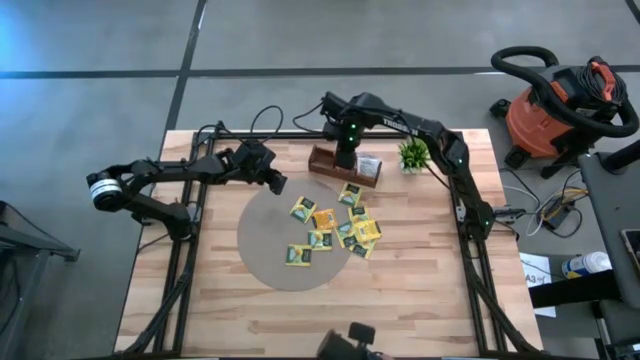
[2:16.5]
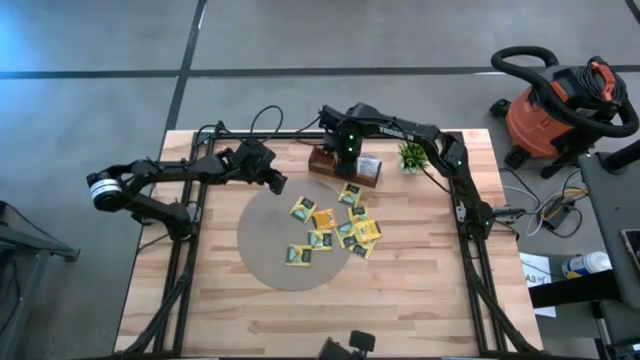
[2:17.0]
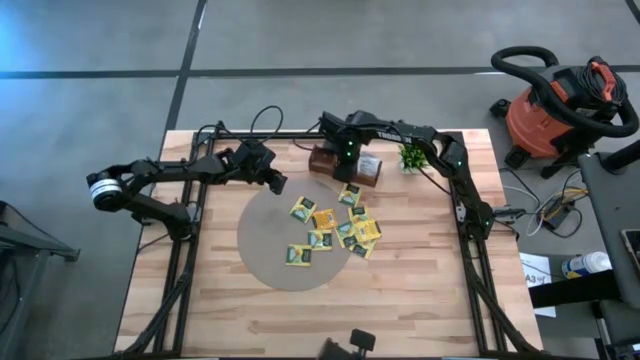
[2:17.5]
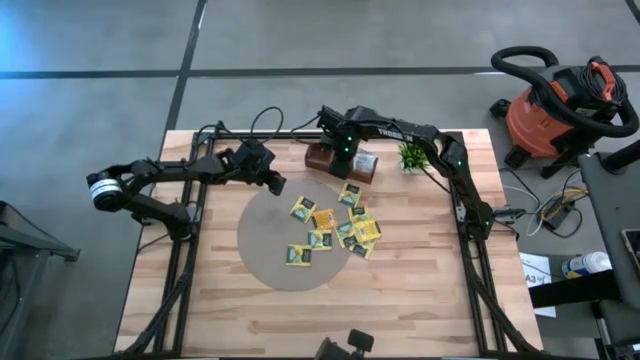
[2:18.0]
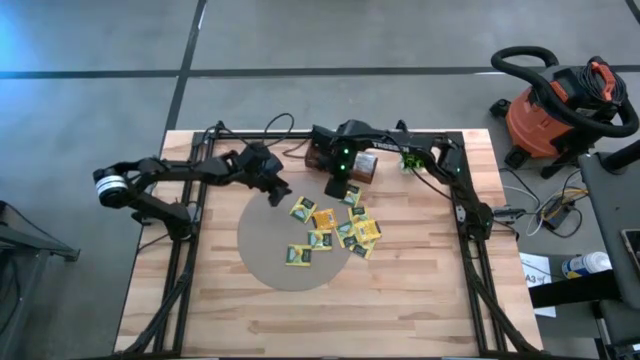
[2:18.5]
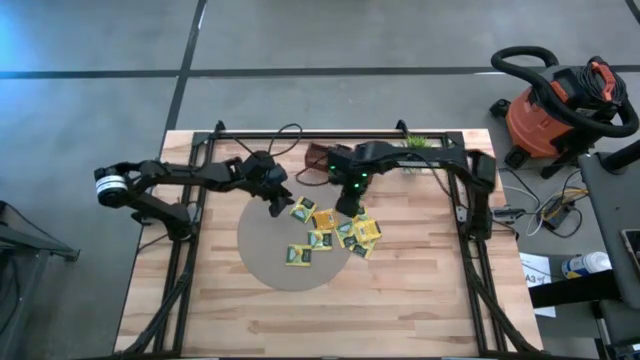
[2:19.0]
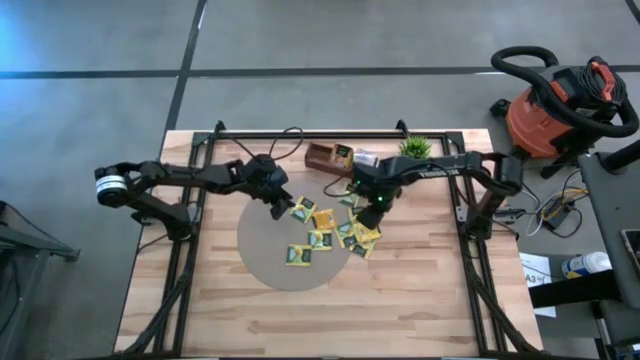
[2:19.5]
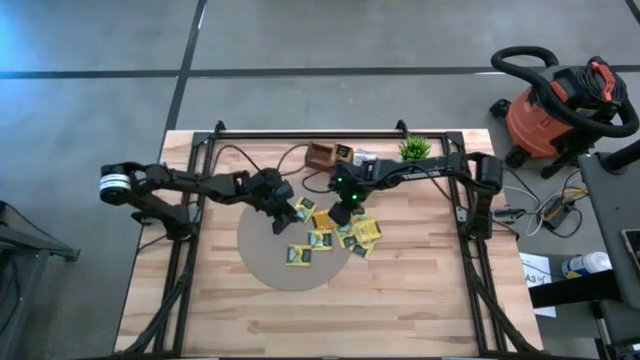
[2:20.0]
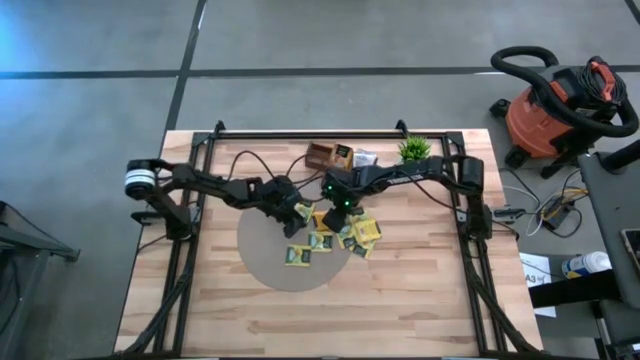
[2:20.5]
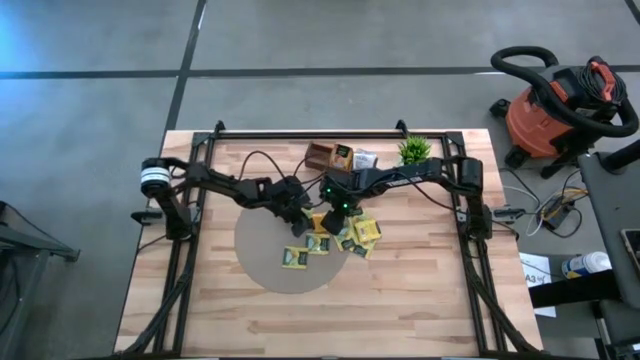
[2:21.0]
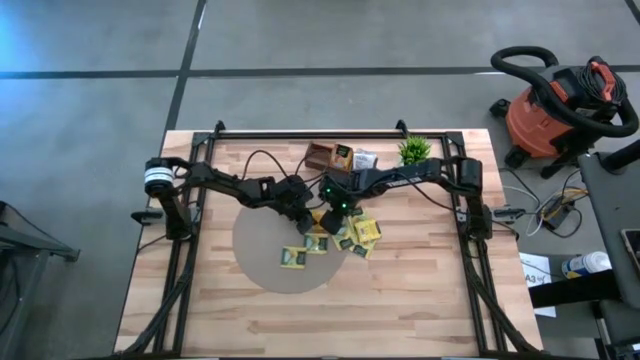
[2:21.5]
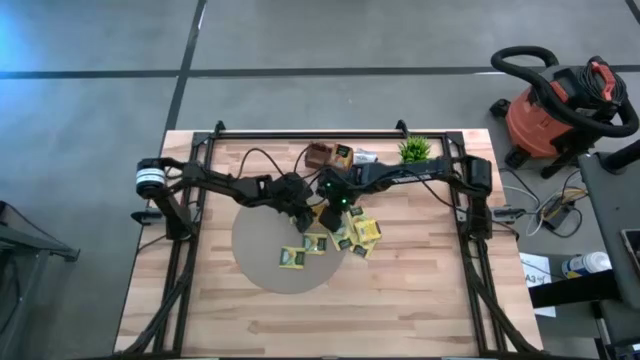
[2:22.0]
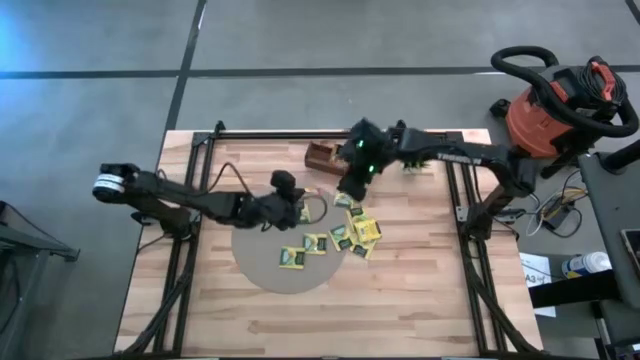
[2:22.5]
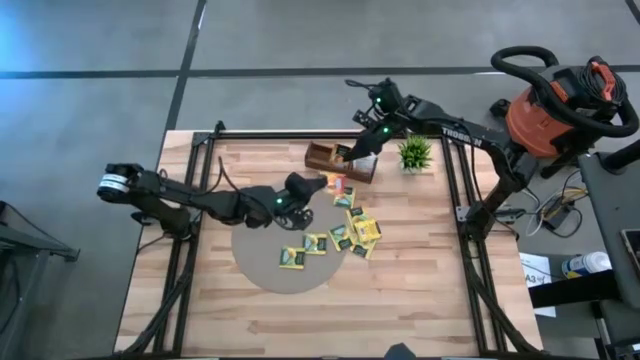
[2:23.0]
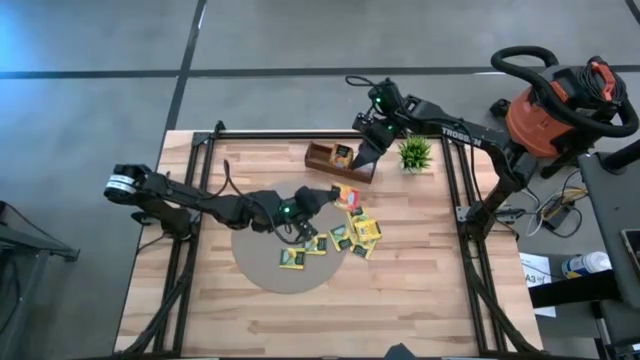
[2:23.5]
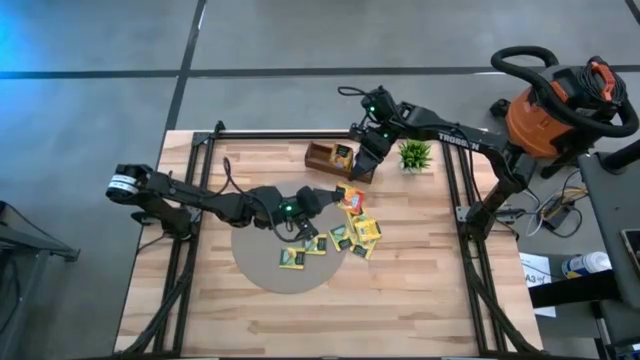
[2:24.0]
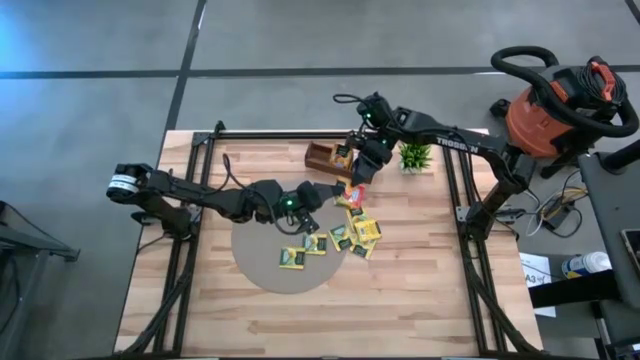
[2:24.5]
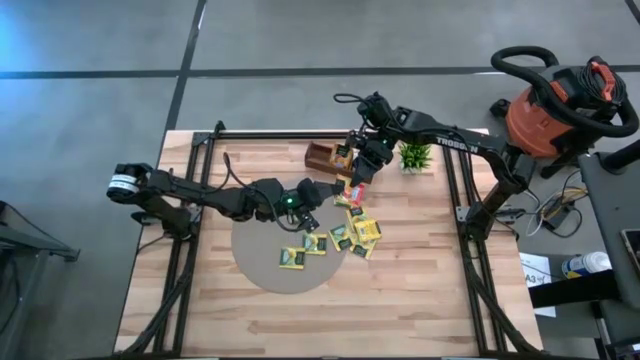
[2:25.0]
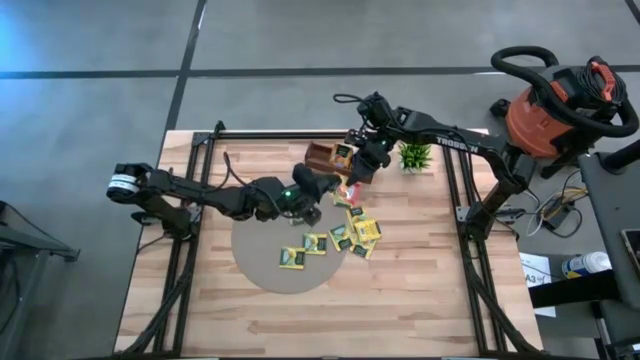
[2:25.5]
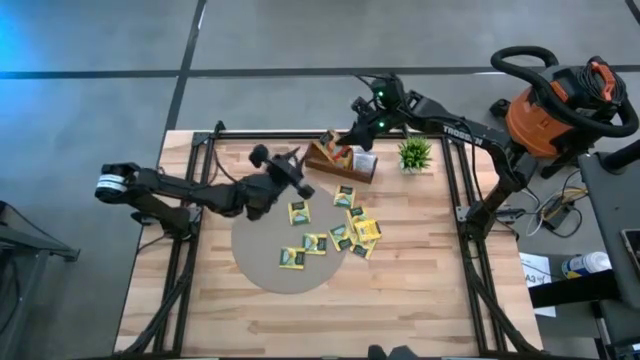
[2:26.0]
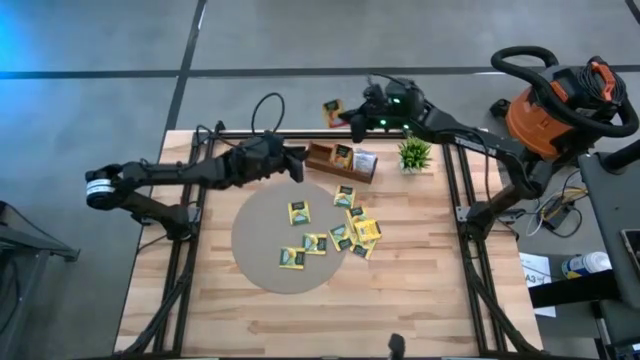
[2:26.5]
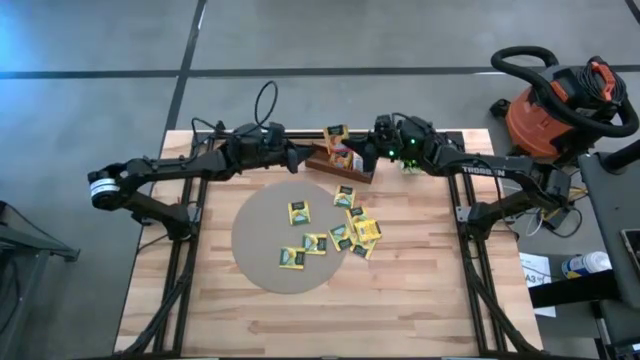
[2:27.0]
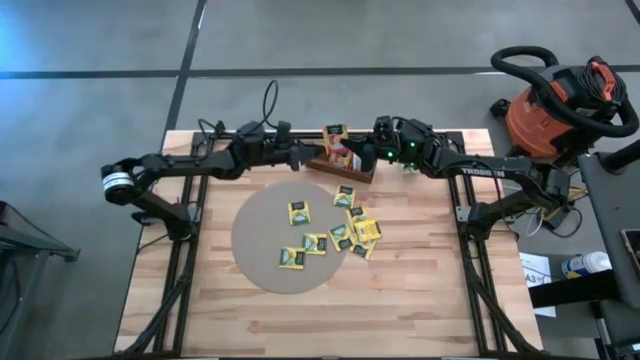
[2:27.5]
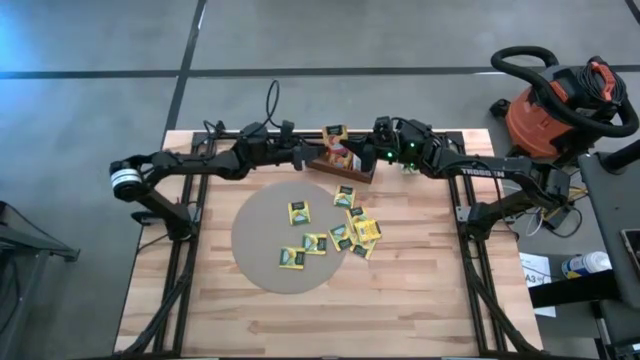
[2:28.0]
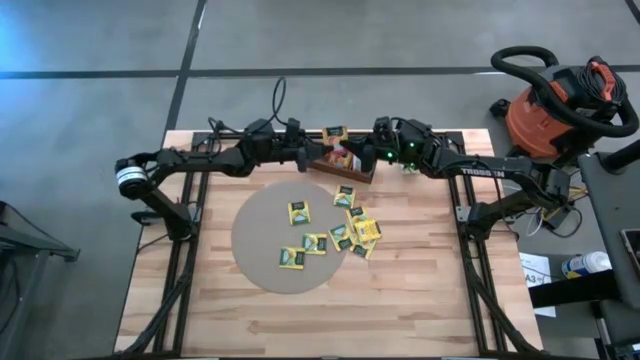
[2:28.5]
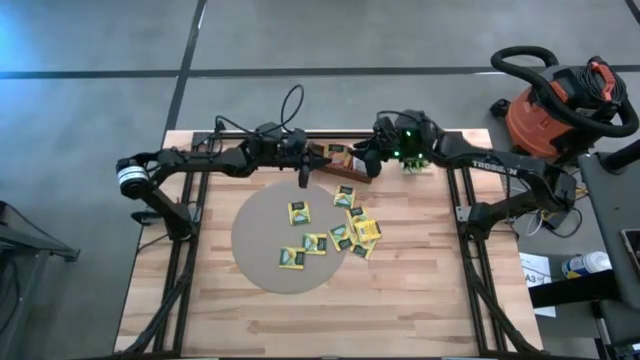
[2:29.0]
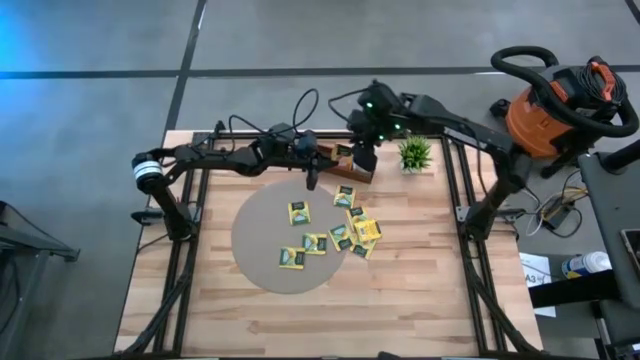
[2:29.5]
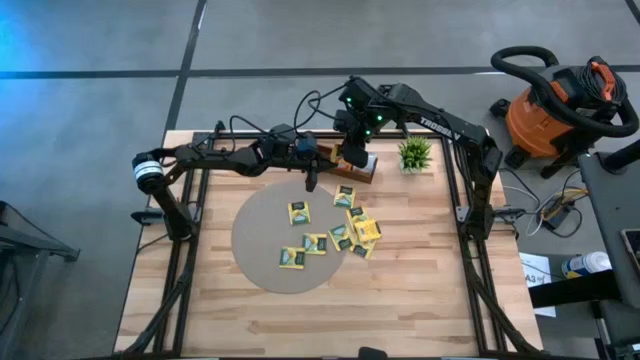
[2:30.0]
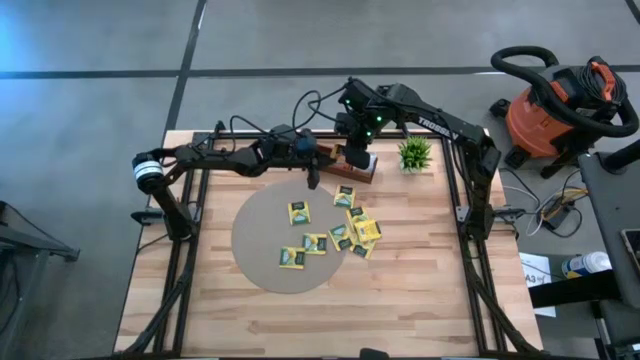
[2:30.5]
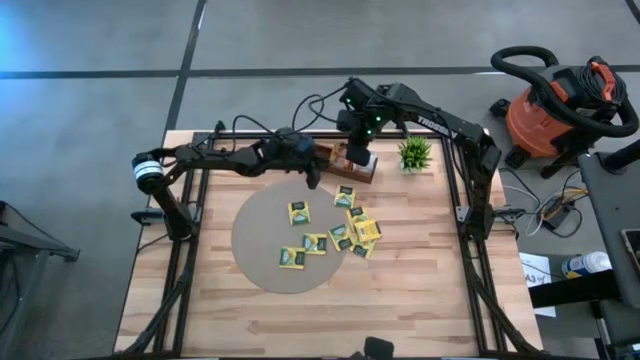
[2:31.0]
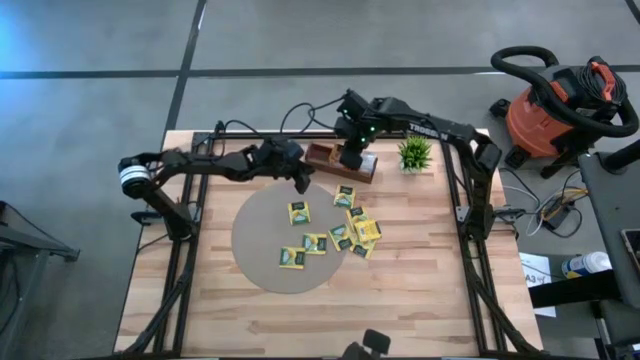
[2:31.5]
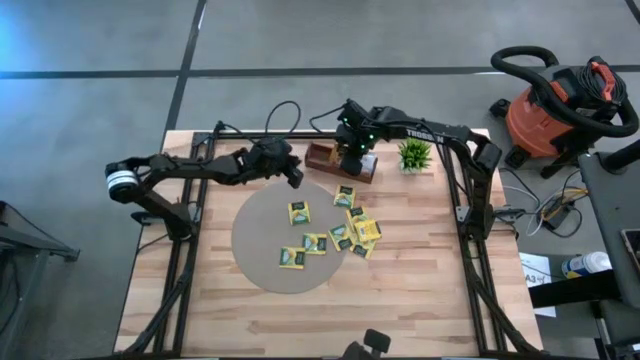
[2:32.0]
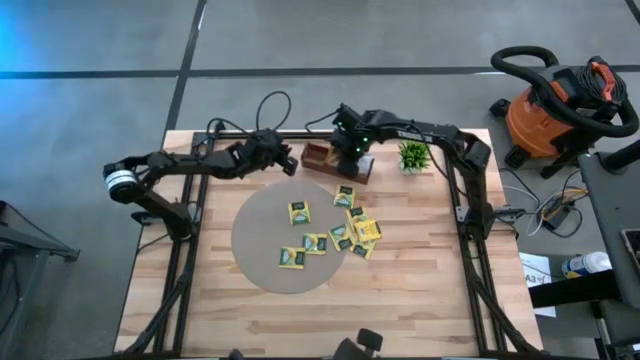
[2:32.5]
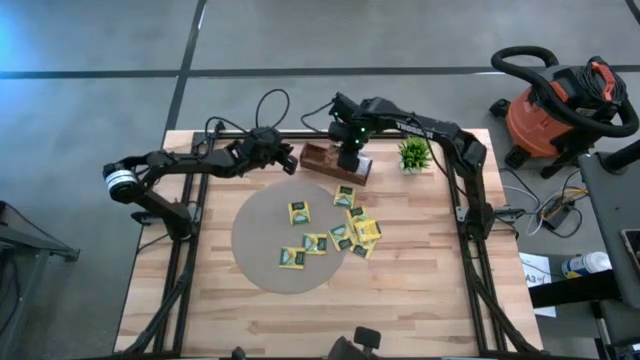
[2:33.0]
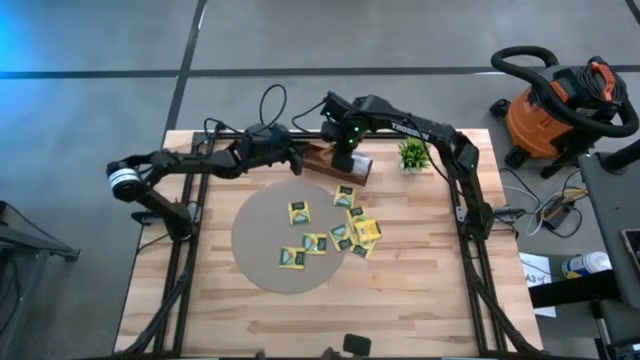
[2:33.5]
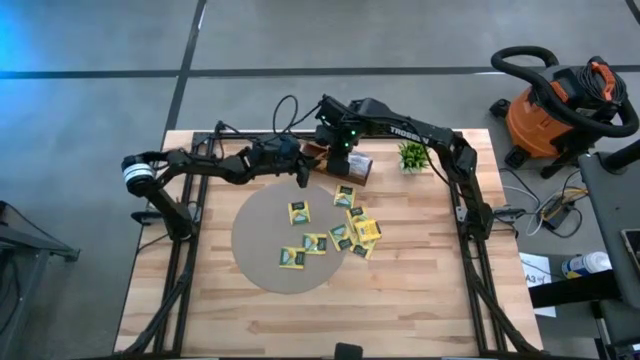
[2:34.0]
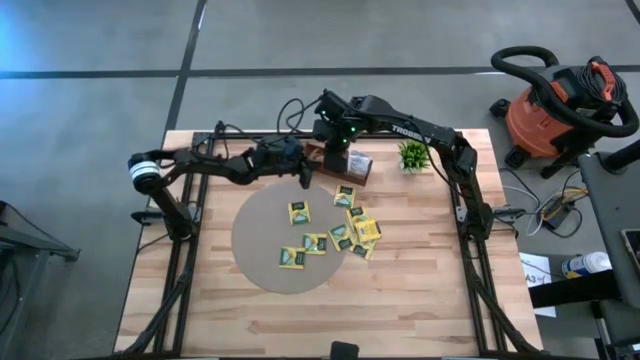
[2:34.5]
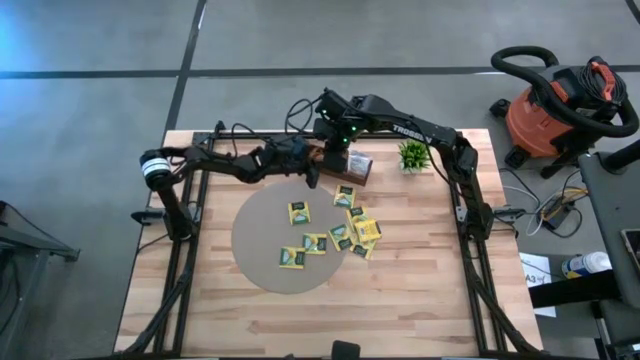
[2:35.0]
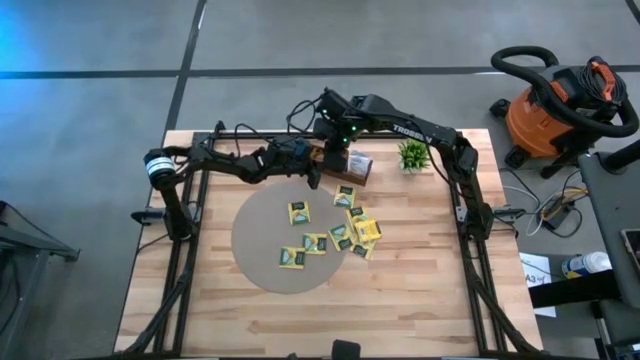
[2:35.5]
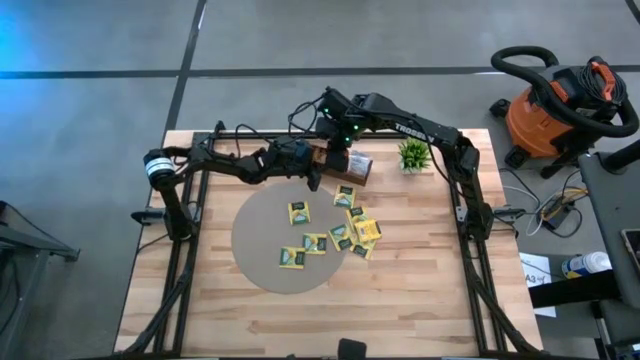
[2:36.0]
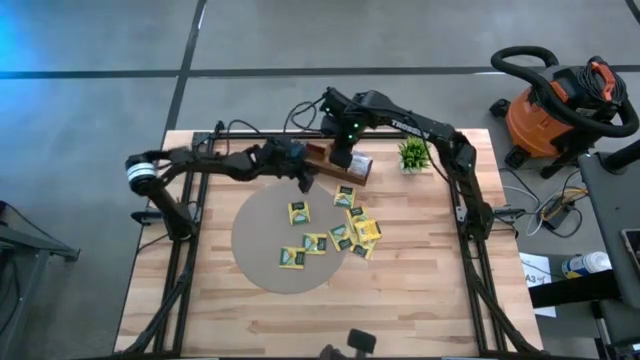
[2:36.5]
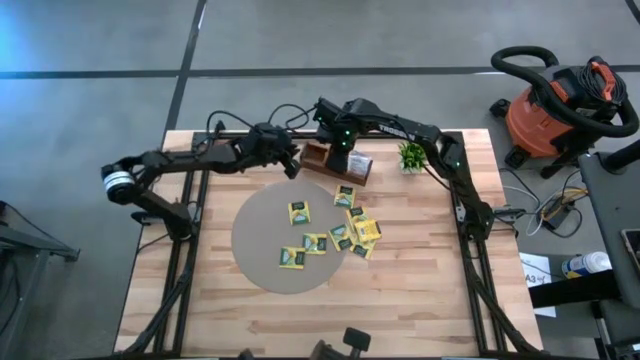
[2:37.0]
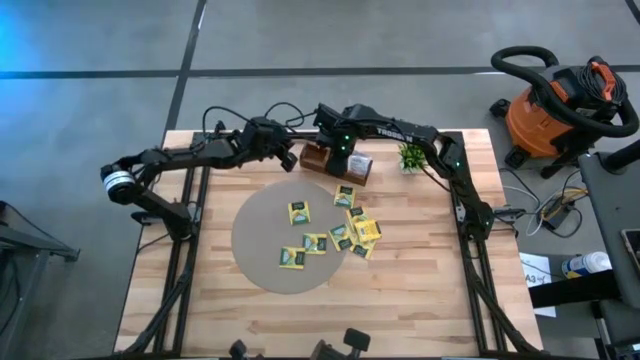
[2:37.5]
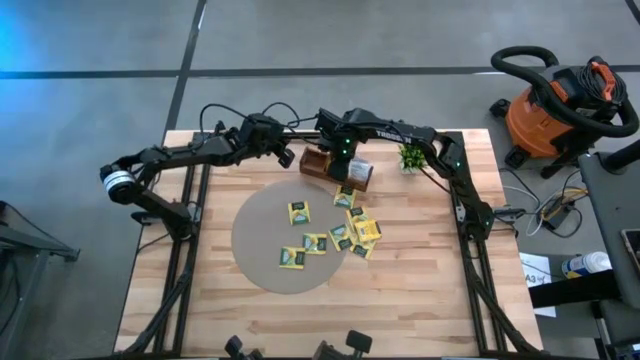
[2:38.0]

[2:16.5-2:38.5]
Task: Pick & Place Tea
Put the red tea sachet into the middle compartment of the wooden organizer
